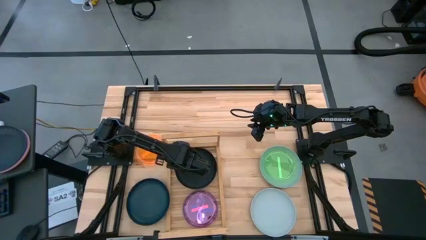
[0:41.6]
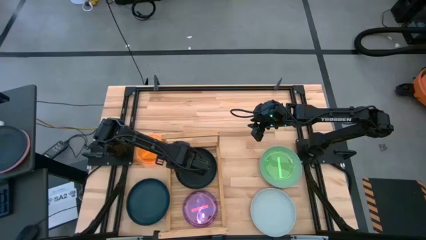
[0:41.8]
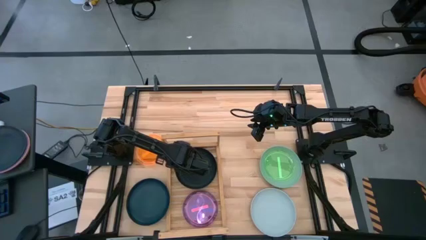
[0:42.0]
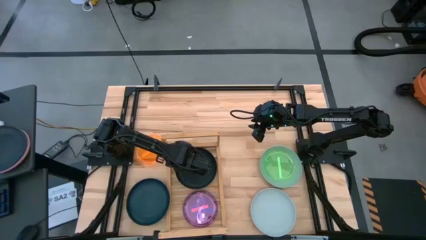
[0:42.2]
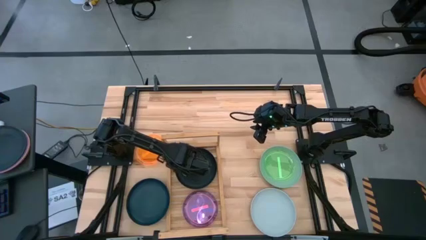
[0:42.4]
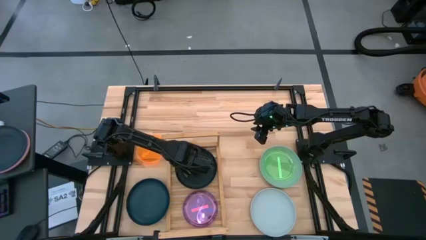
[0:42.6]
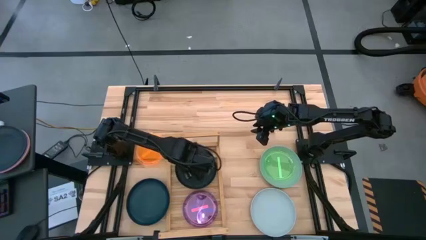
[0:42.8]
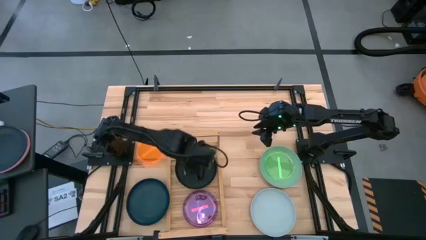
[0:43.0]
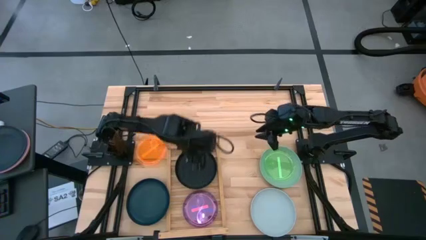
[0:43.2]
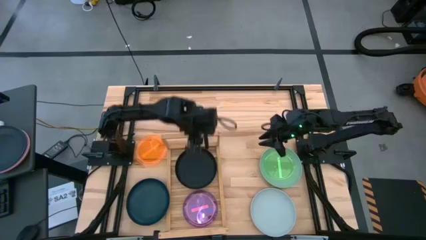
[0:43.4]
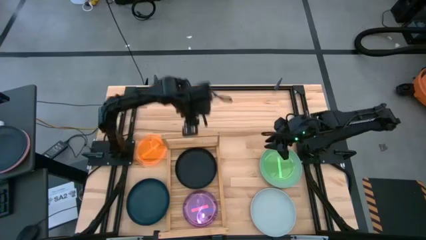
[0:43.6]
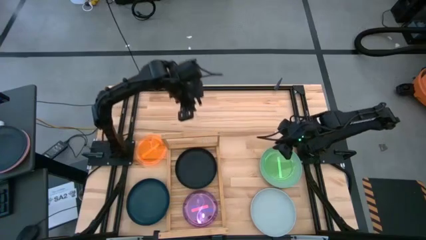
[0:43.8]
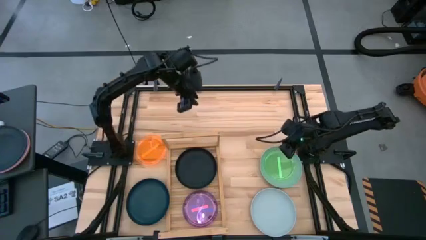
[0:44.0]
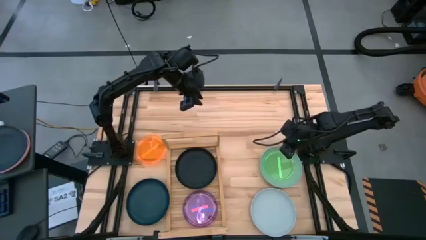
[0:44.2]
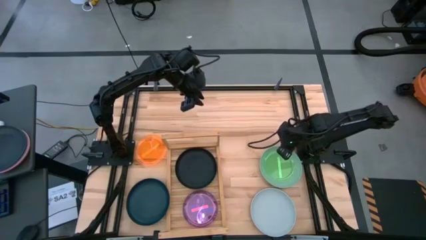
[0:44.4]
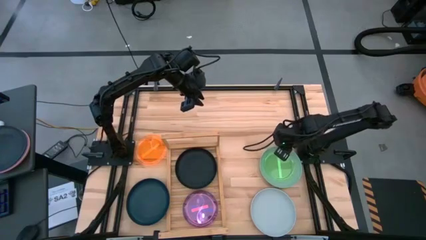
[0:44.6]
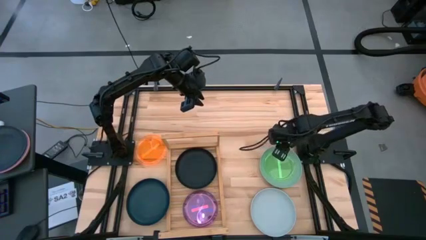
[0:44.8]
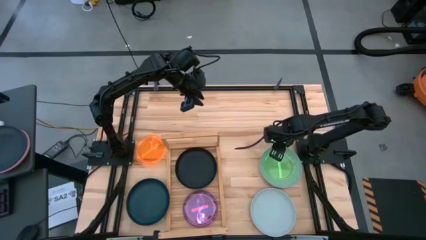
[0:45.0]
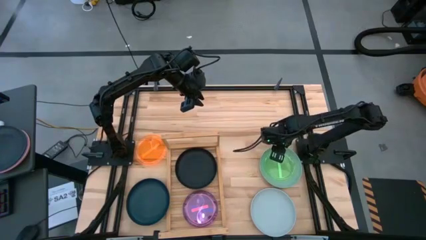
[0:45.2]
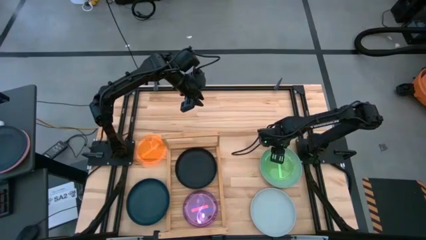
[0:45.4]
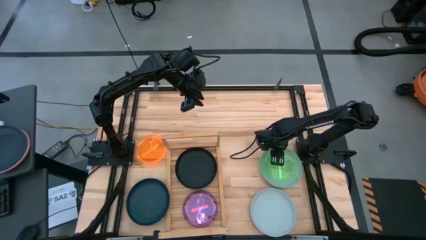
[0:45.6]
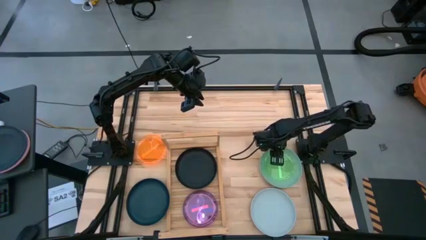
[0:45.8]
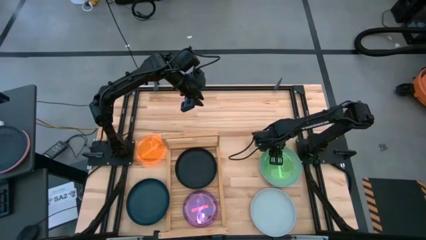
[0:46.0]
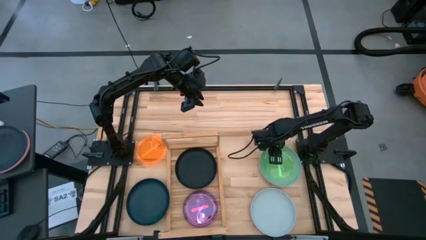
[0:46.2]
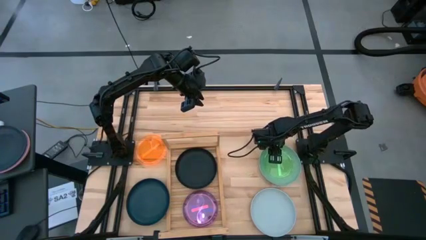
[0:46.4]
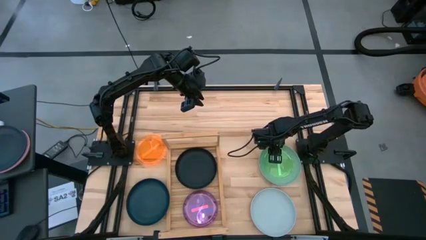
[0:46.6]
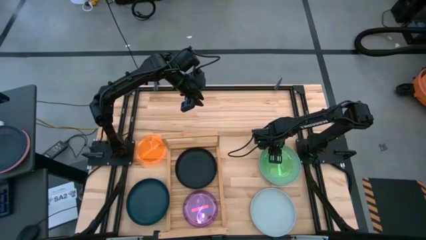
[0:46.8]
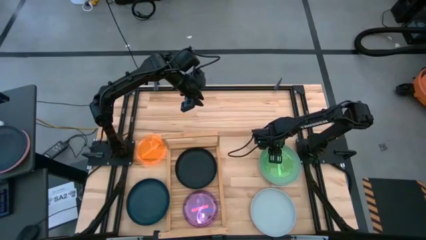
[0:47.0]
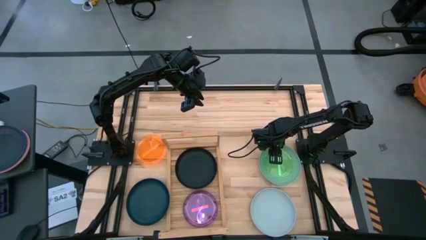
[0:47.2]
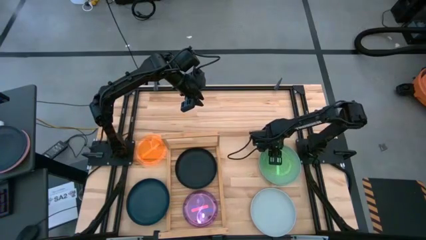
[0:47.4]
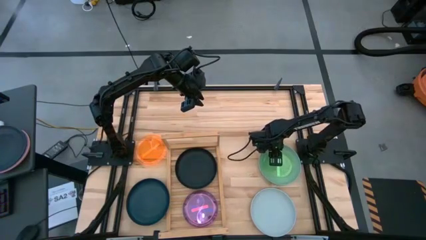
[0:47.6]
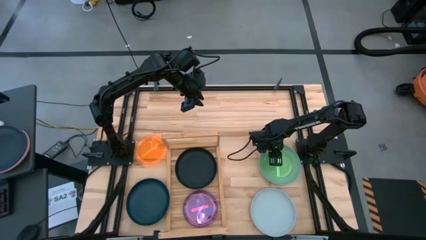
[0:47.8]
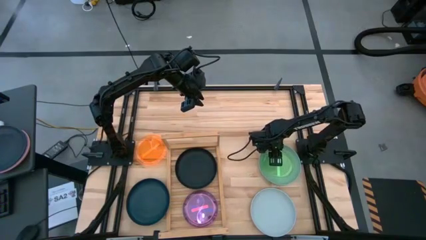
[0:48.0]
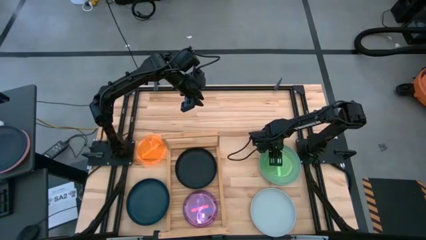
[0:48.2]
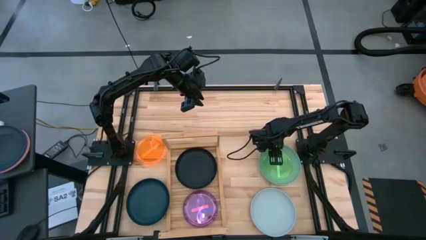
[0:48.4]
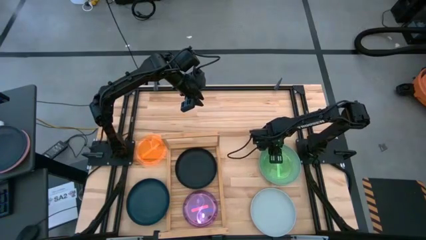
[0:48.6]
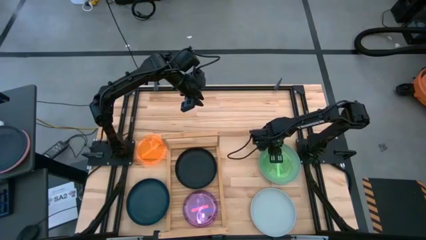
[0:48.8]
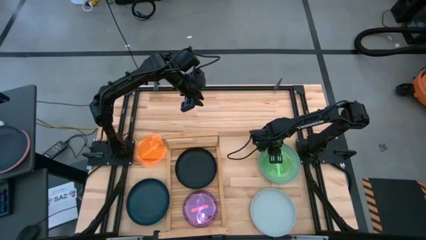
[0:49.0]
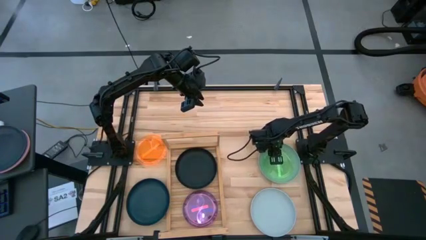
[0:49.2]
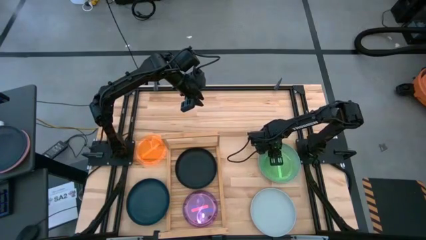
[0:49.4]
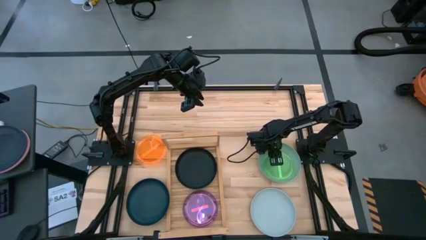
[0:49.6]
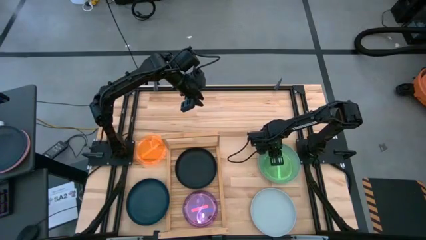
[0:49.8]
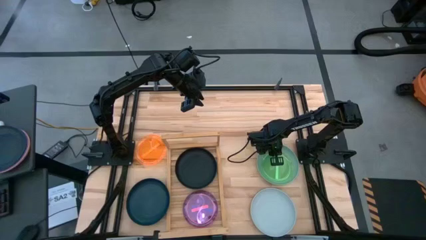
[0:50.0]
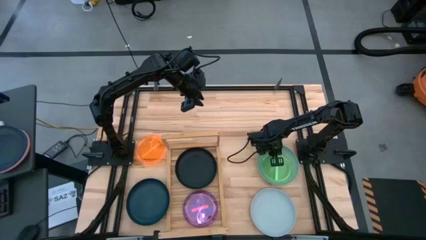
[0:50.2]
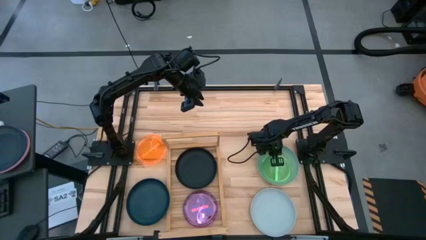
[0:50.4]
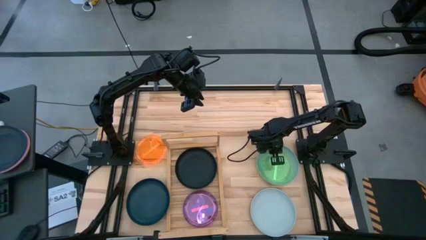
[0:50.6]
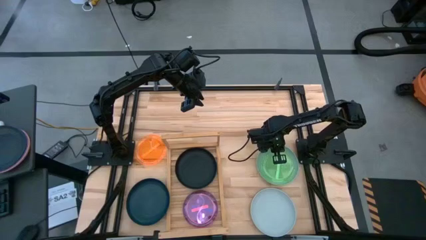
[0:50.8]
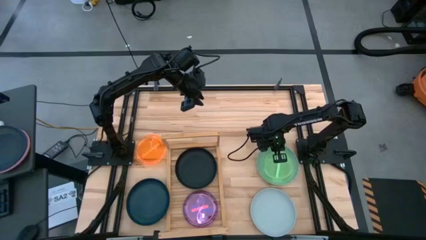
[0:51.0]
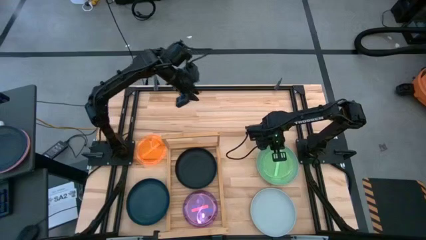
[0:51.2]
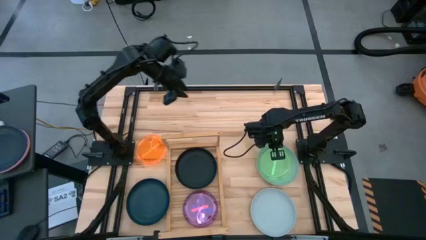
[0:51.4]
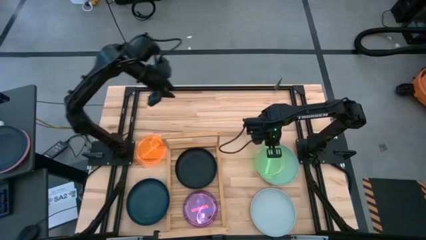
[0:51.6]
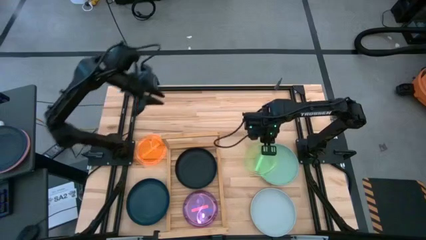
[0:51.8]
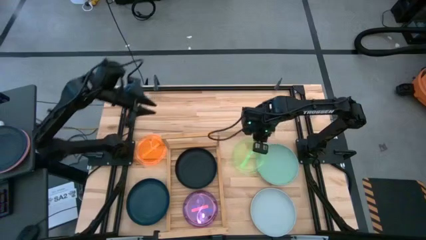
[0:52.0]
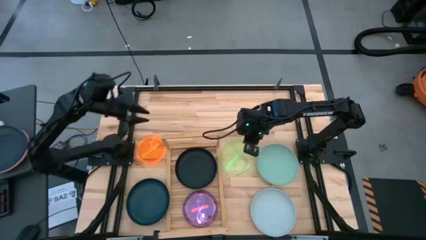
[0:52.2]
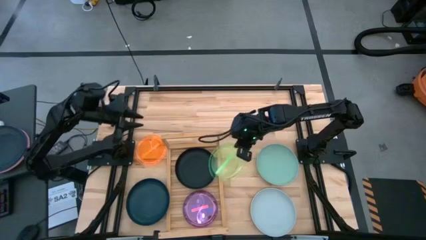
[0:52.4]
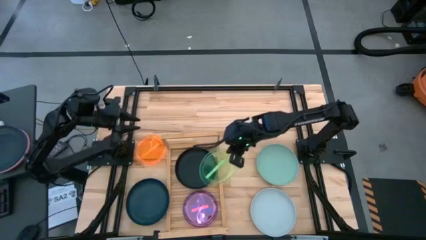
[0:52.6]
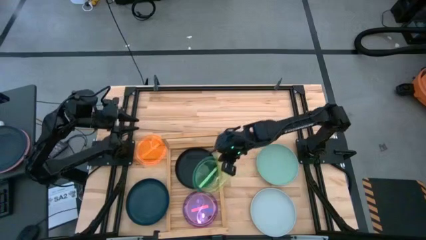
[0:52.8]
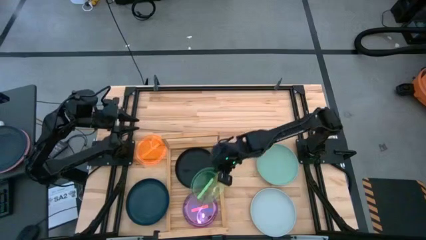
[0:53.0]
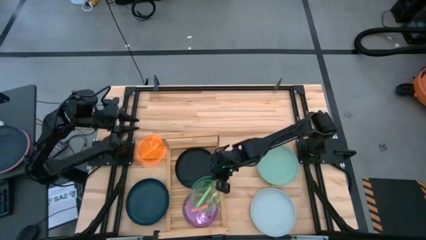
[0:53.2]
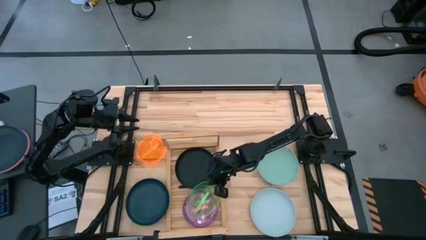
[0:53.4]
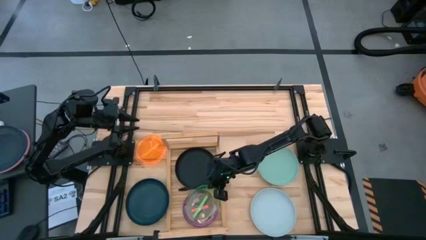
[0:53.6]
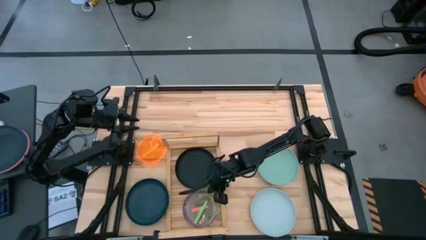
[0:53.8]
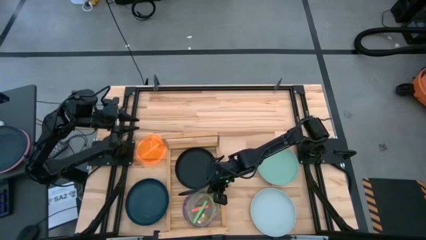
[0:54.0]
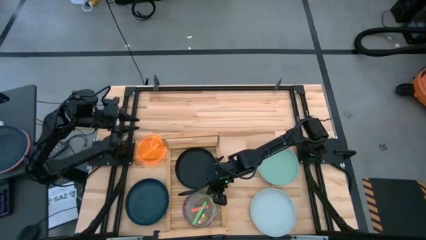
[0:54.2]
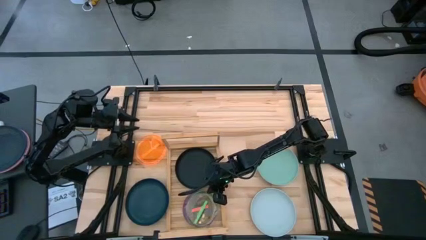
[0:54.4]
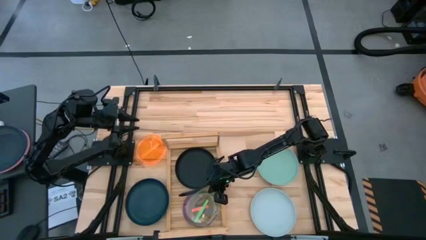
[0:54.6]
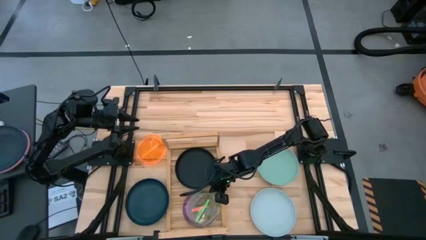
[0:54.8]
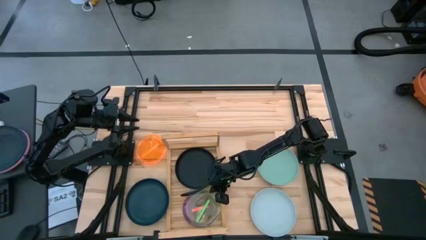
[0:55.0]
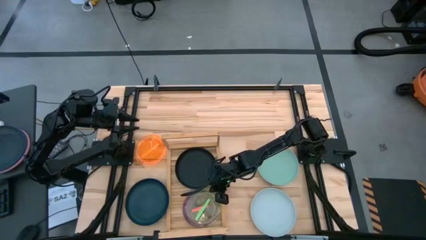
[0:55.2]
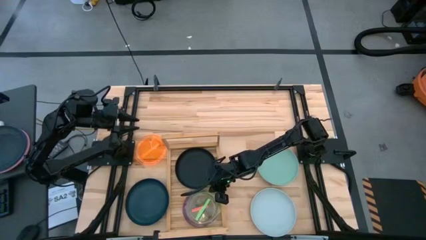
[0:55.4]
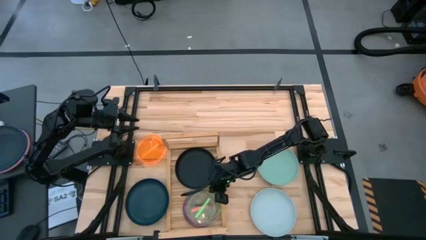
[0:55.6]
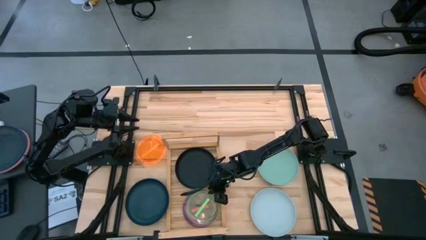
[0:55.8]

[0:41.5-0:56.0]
Task: Place and stack plates onto a shelf
Stack the small green transparent plate on the top of the small pink transparent plate on the shelf
